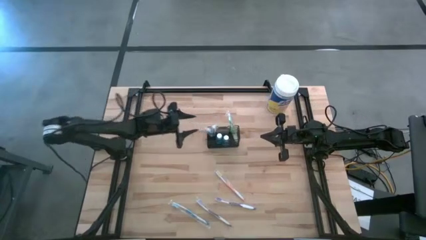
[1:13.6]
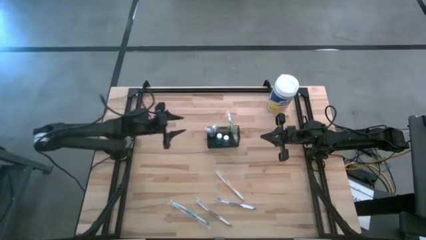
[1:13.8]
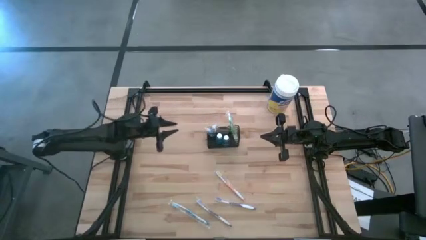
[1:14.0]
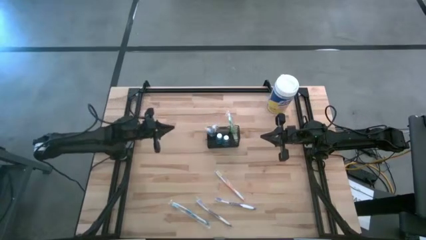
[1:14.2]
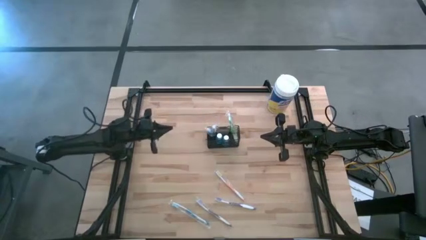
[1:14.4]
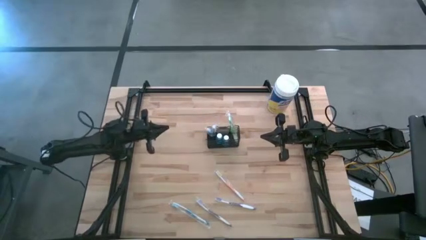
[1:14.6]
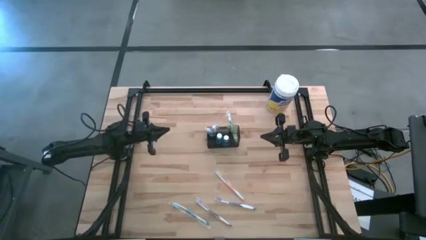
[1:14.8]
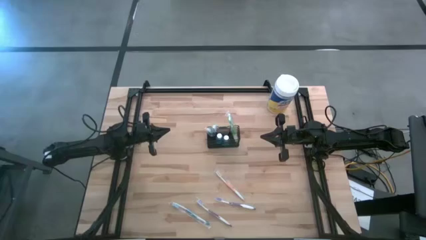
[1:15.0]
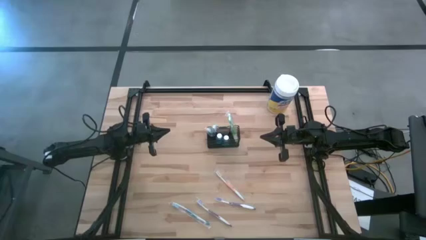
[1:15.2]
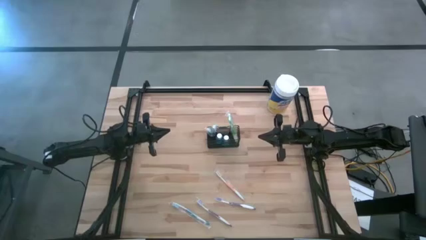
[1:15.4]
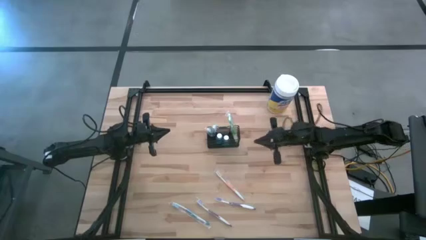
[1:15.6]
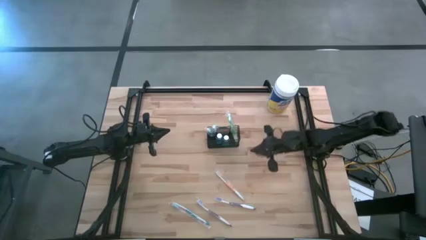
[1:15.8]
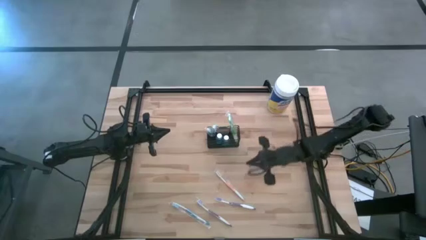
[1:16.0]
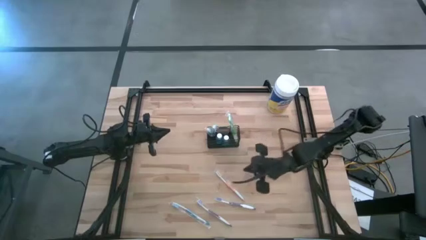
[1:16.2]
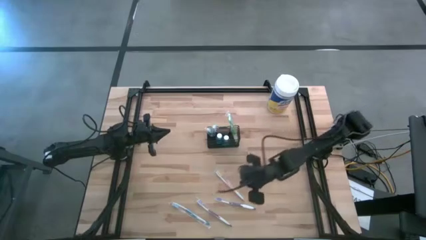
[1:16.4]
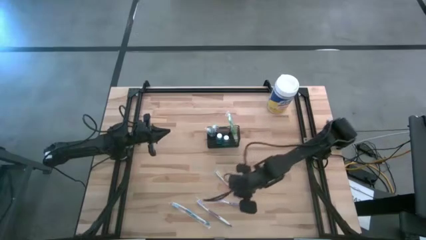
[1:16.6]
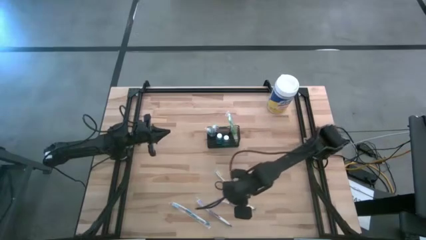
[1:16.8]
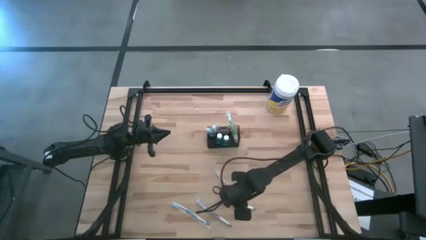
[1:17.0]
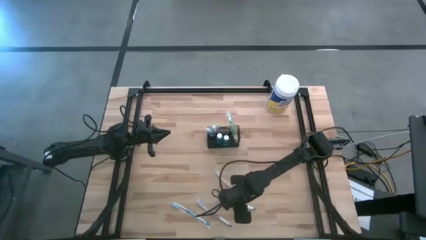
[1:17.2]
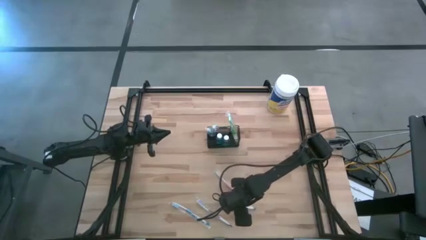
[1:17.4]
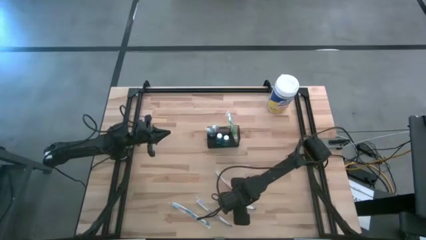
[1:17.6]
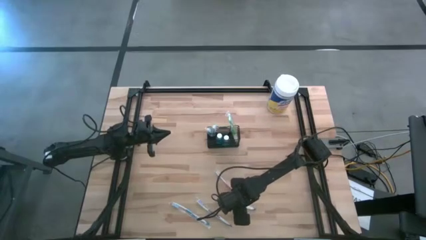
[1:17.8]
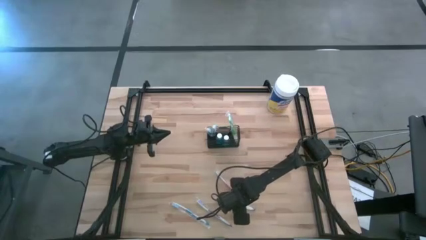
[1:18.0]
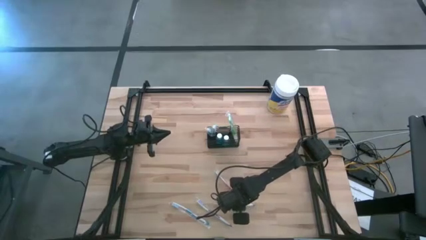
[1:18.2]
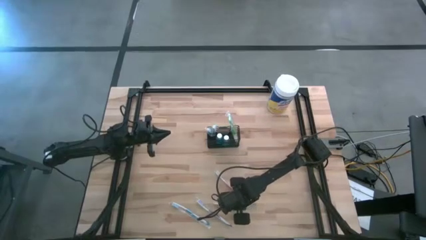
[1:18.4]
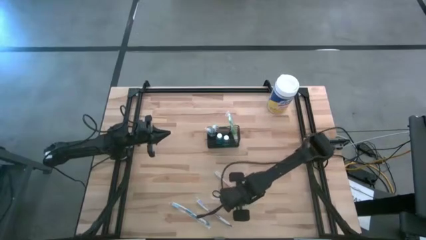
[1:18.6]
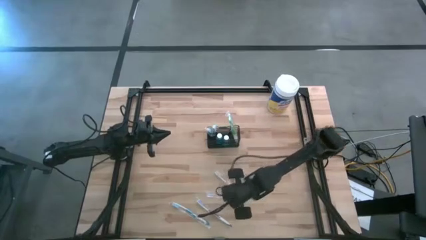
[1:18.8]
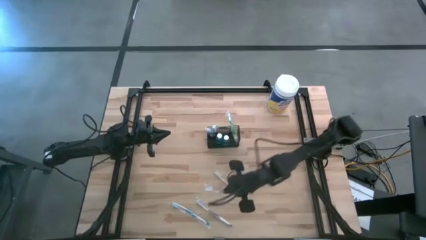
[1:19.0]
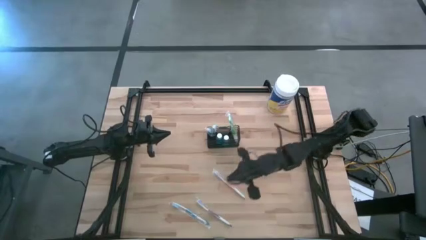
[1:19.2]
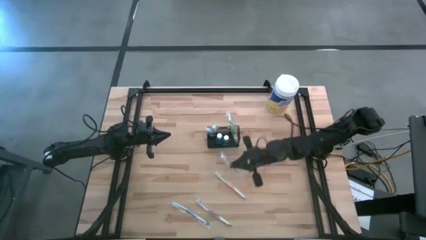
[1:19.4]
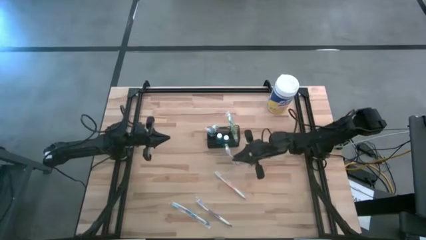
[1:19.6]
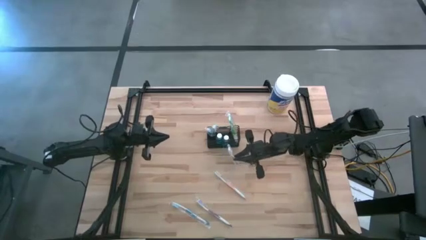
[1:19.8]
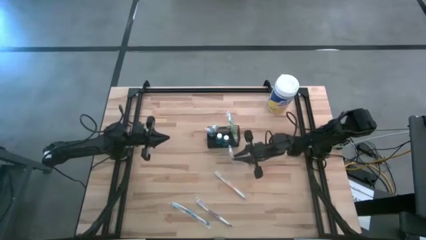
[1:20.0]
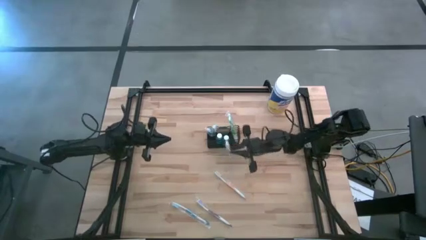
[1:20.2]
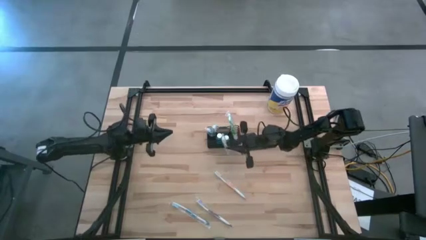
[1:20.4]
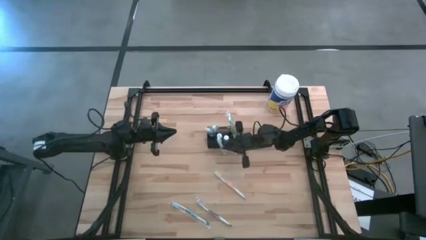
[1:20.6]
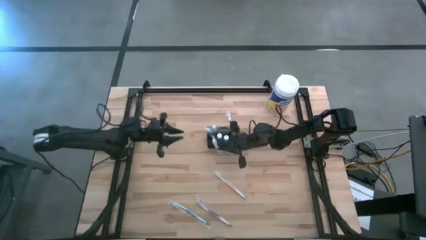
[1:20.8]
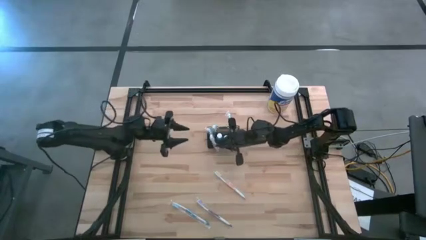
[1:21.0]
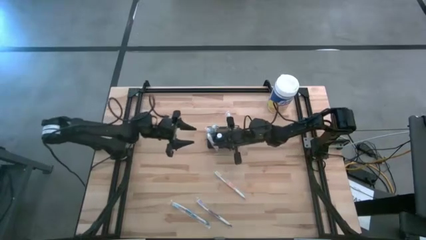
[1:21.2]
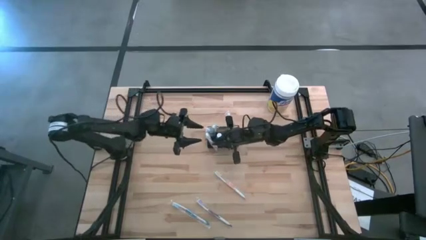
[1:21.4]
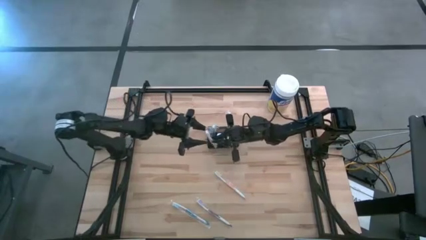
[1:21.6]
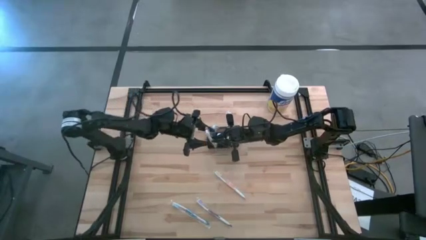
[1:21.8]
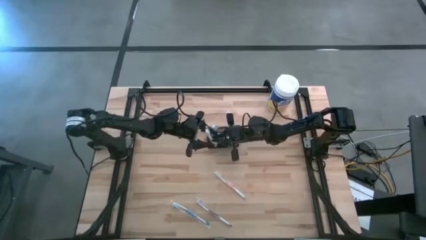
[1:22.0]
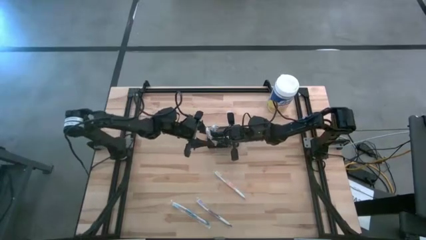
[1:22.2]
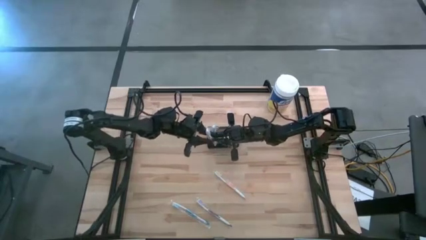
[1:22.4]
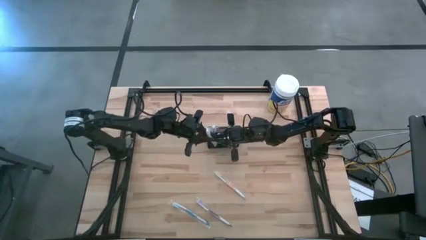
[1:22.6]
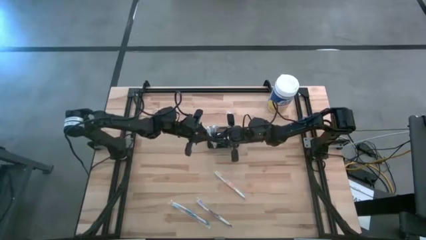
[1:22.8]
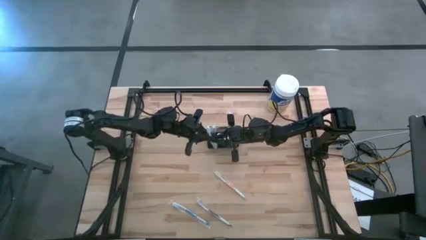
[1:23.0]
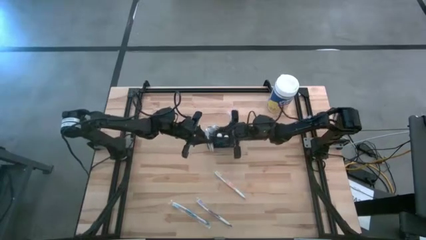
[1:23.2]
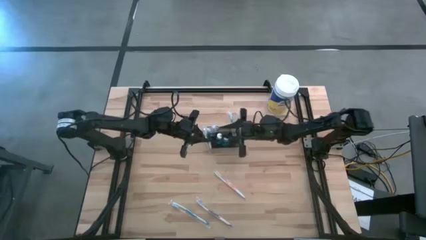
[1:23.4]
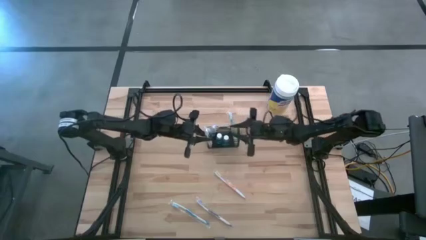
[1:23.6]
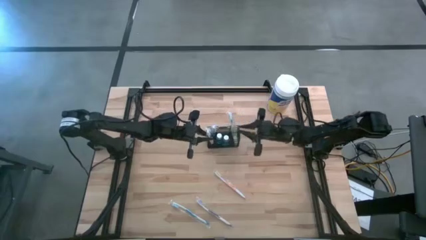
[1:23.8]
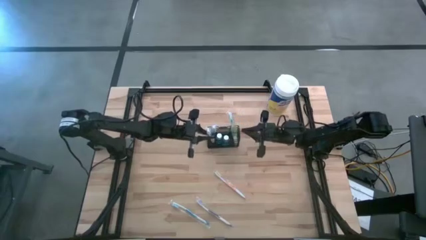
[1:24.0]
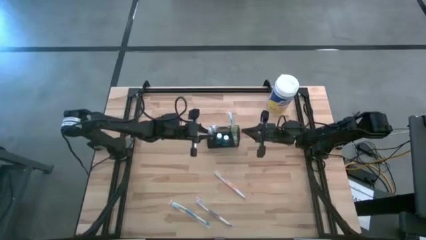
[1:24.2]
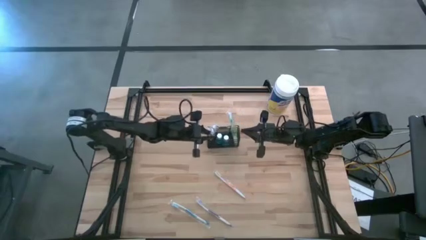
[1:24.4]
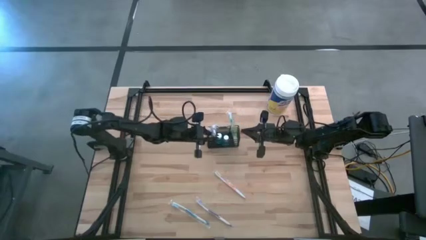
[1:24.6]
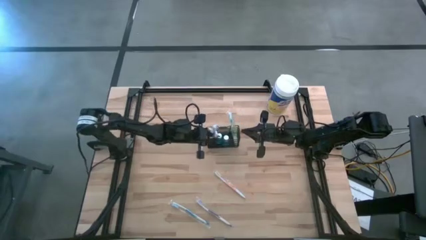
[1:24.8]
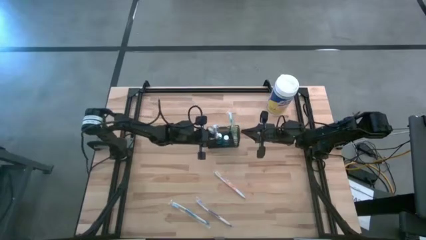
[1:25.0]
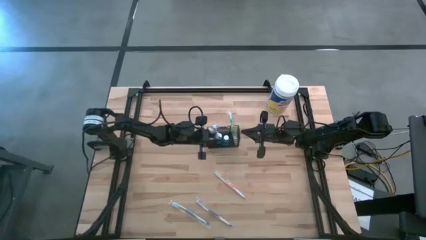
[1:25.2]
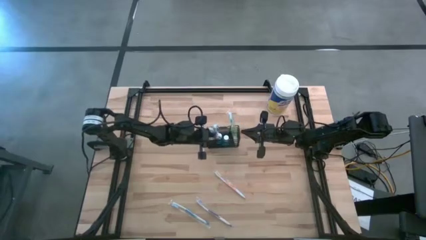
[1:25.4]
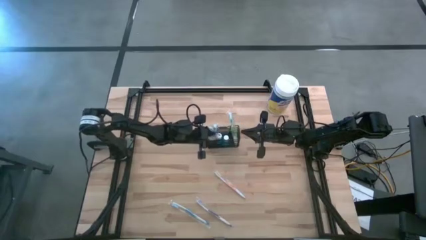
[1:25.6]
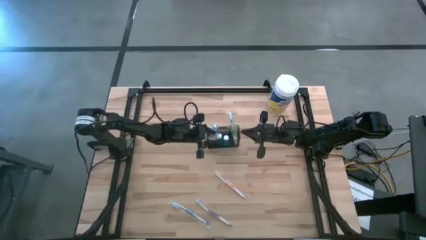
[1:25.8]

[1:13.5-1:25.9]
Task: Pick & Place toothbrushing station
Put the right purple toothbrush into the wire organizer
